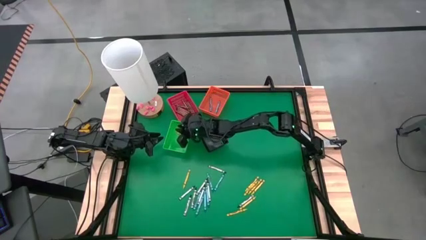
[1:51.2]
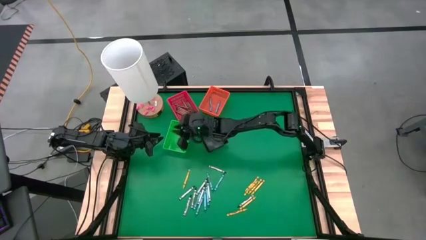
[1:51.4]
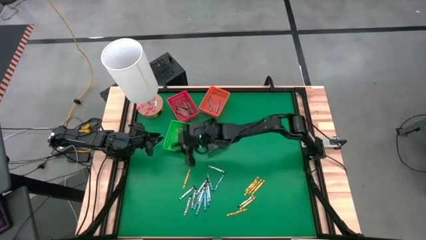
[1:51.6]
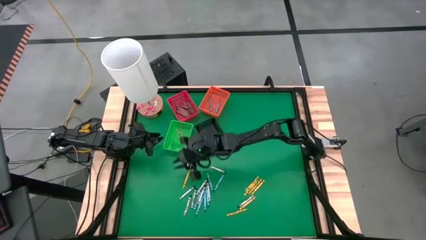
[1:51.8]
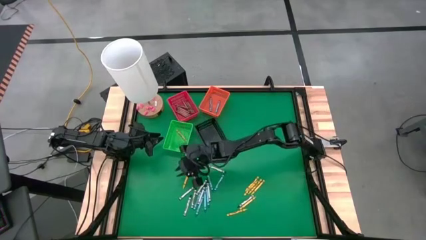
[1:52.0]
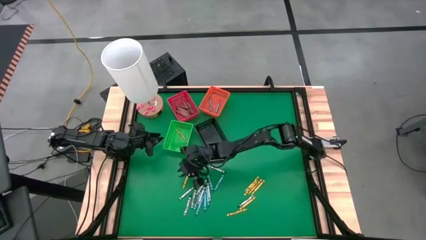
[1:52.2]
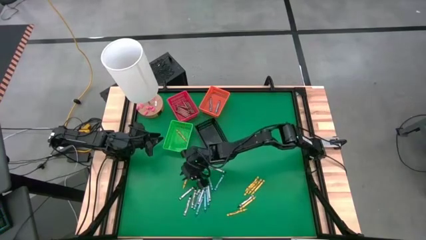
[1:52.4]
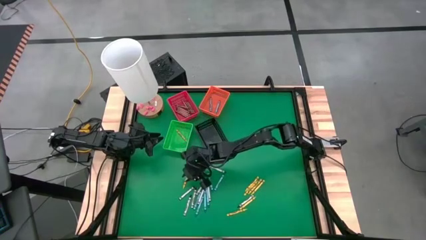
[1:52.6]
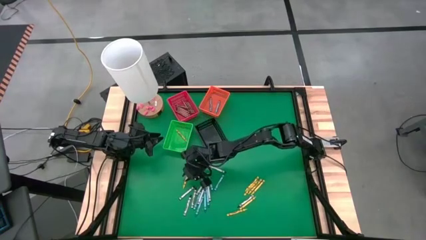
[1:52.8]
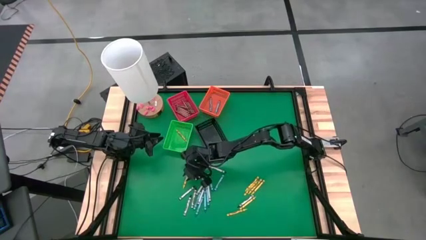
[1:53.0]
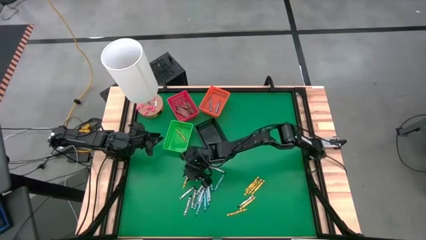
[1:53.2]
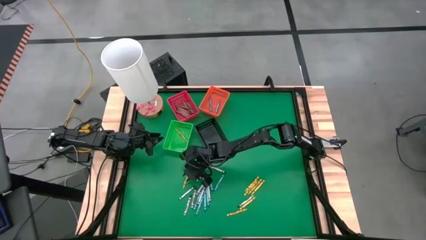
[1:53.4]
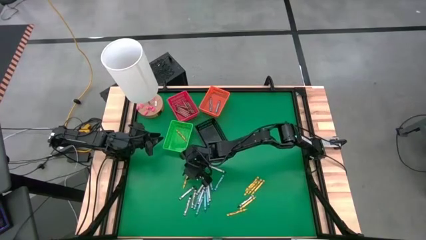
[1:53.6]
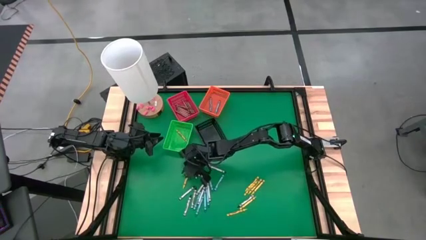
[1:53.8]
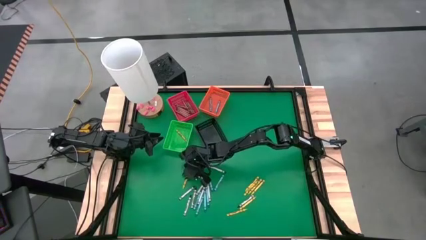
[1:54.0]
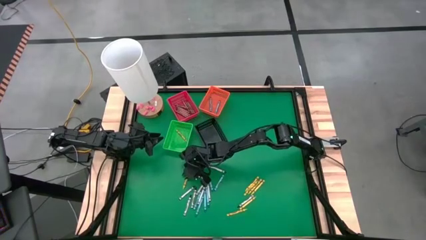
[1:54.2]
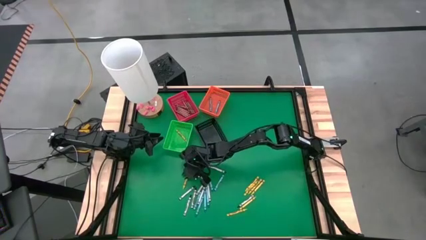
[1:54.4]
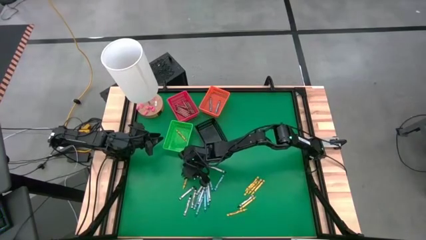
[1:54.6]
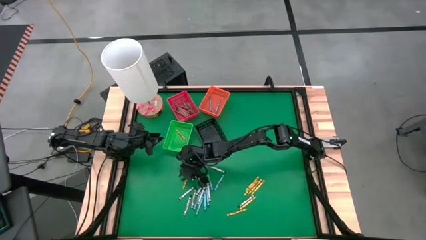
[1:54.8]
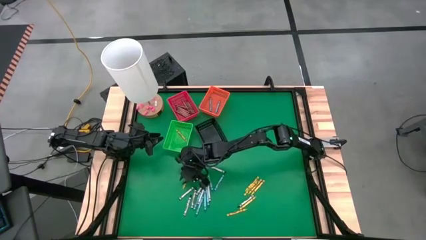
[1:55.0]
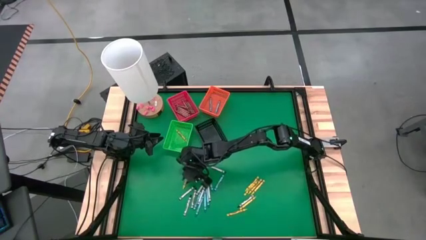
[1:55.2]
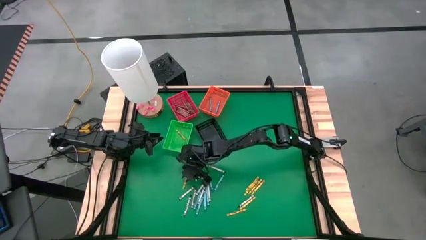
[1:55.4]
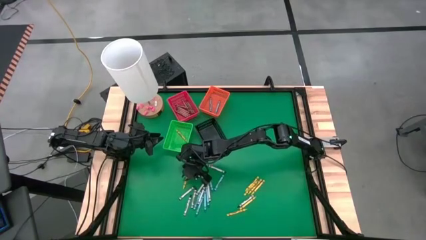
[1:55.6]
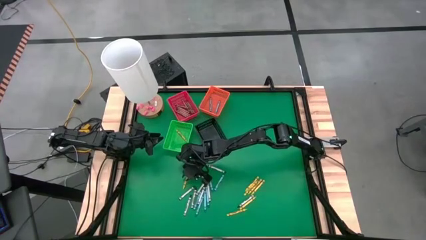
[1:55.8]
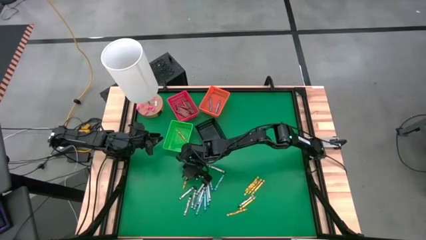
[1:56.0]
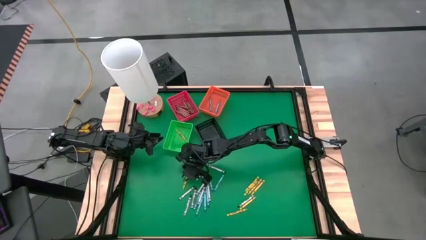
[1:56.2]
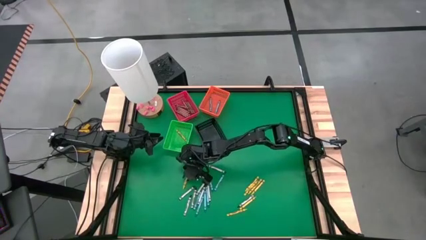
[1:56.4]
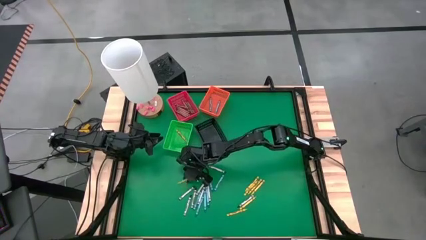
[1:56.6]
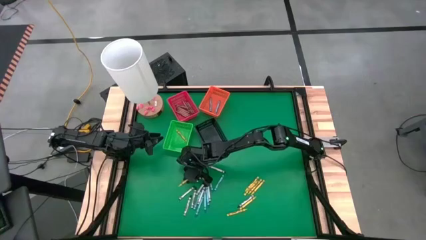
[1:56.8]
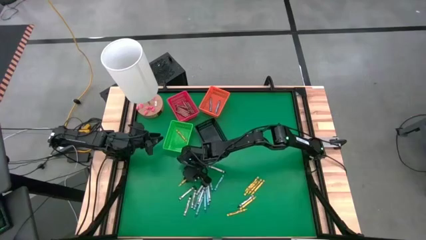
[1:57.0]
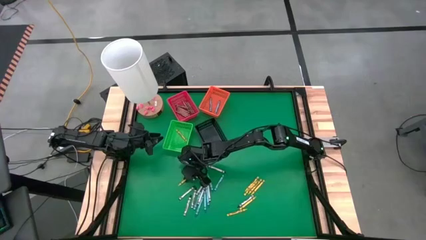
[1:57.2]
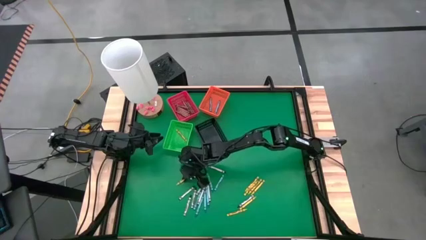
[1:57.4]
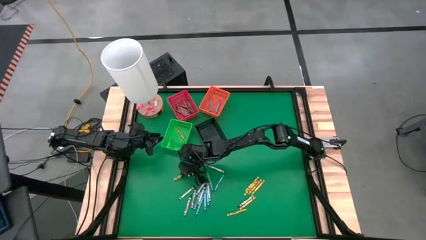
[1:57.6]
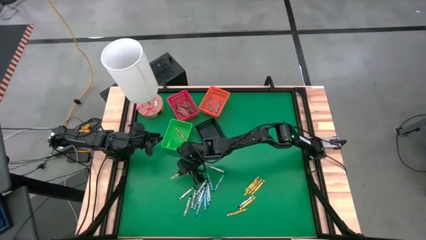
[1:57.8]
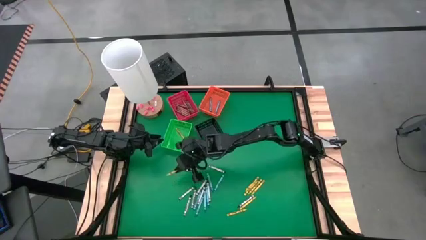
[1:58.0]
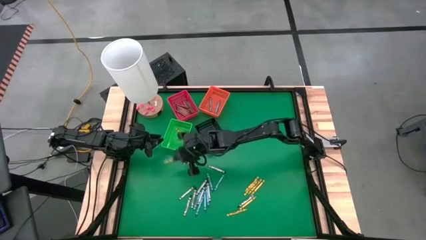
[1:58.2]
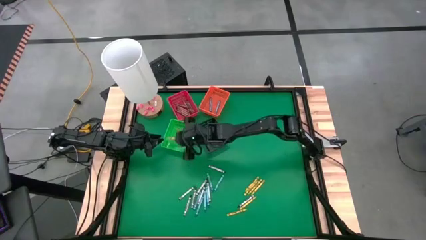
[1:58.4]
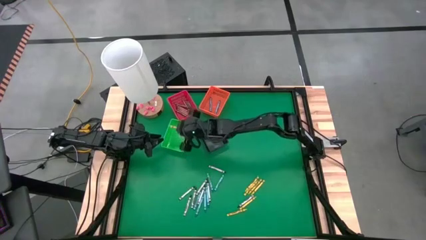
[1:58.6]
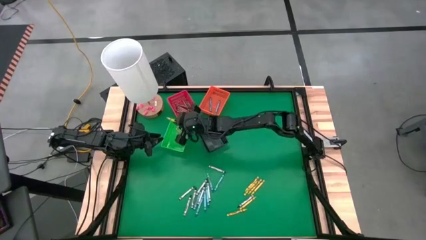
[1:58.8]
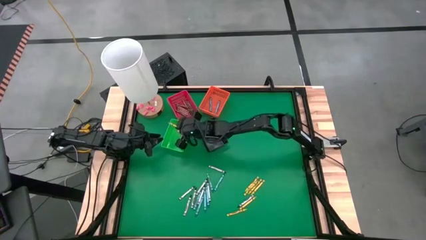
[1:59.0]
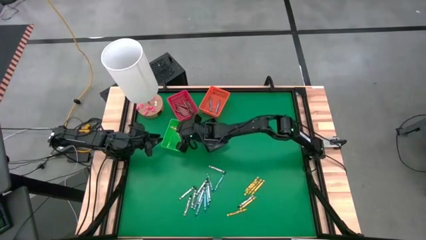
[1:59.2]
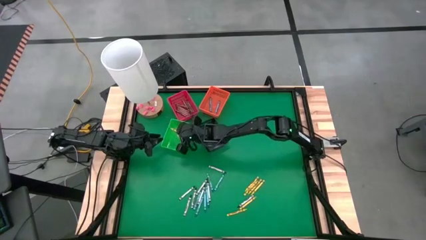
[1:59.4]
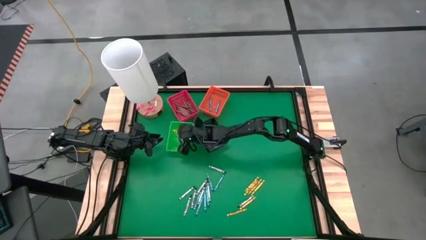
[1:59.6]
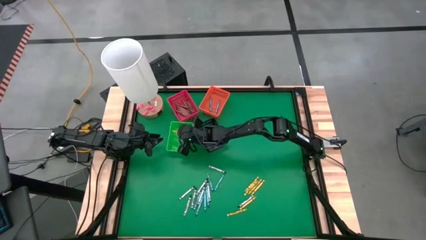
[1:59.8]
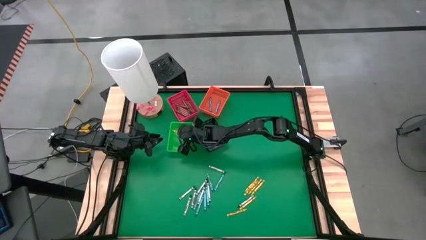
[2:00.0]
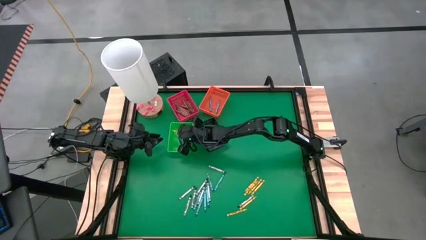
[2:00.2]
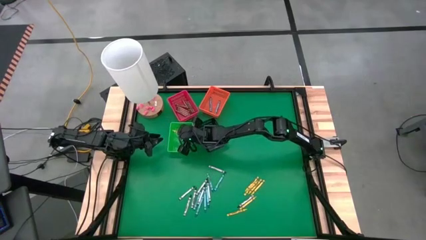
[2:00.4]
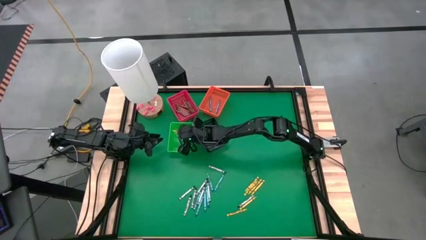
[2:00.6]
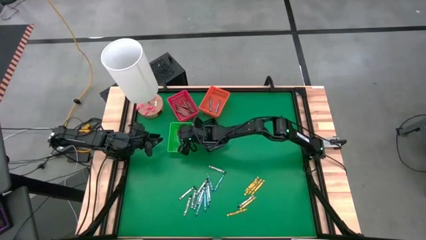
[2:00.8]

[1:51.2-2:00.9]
Task: Sort crayons
Put the yellow crayon into the green bin

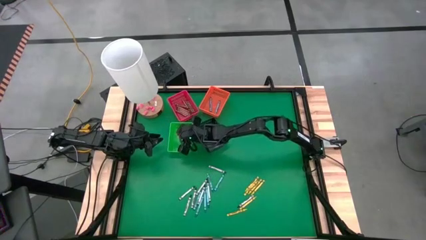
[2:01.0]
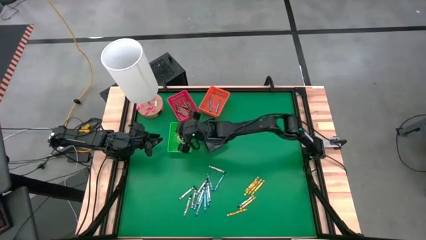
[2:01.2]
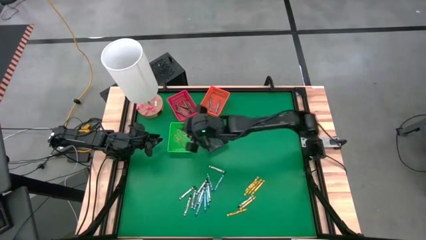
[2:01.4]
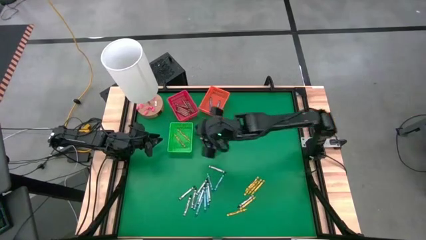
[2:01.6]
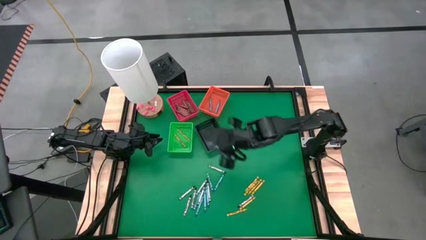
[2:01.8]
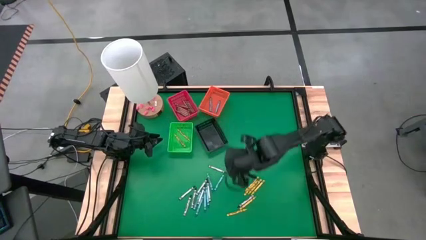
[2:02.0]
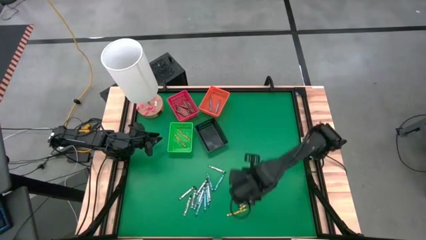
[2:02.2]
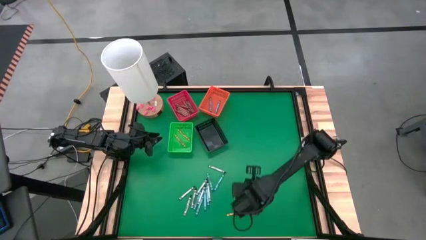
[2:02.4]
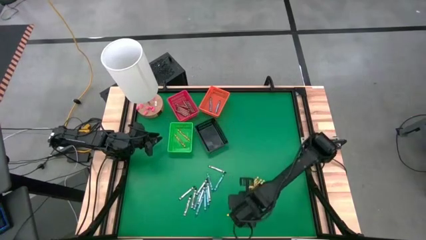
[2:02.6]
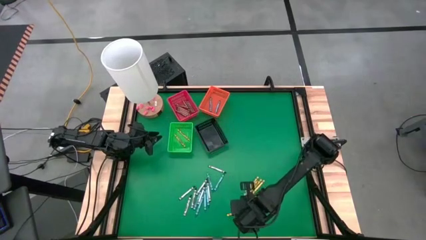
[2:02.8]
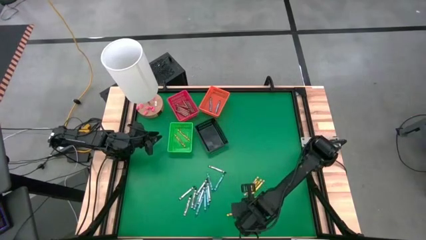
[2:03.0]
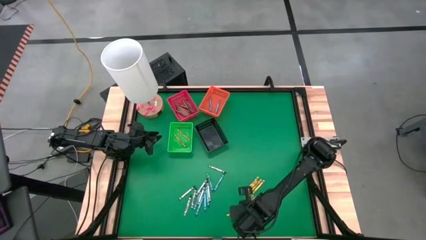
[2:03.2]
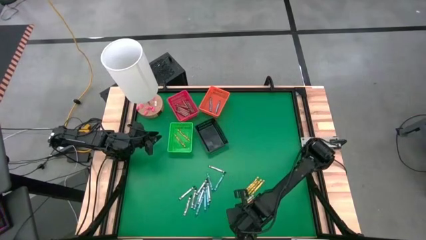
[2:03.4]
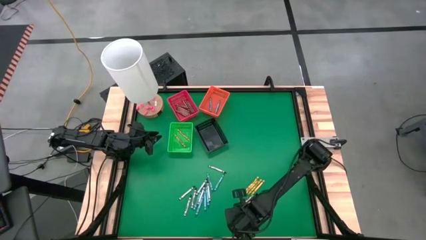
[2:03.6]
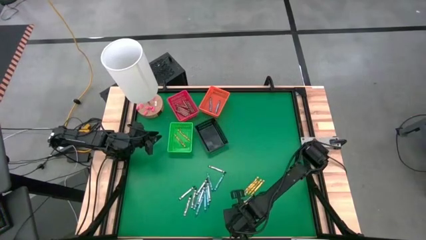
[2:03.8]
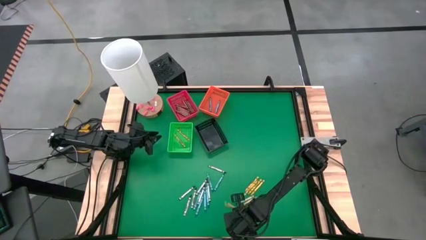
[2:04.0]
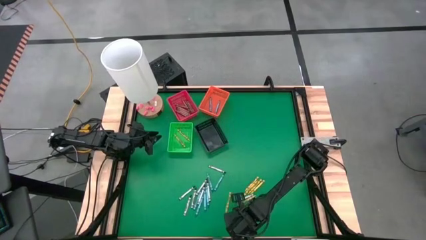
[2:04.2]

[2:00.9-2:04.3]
Put the yellow crayon into the green bin
